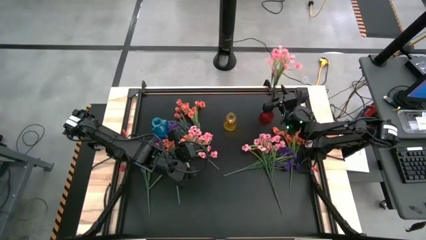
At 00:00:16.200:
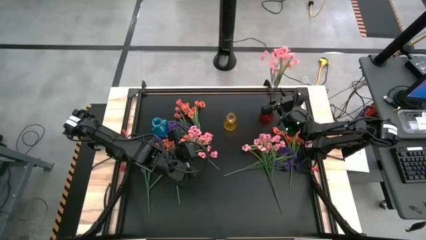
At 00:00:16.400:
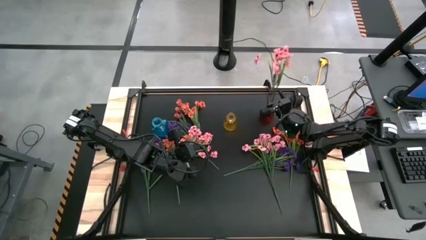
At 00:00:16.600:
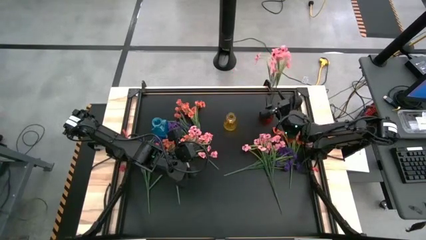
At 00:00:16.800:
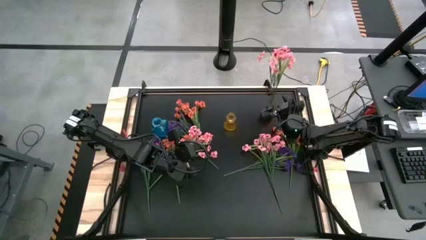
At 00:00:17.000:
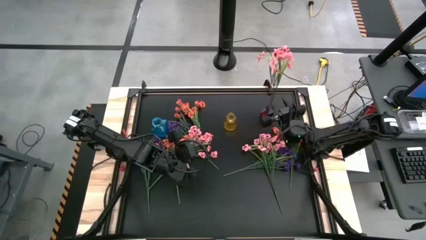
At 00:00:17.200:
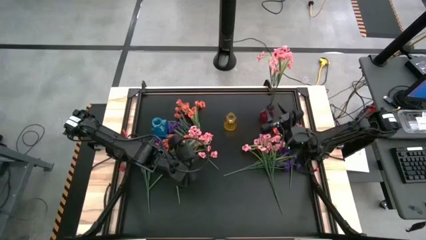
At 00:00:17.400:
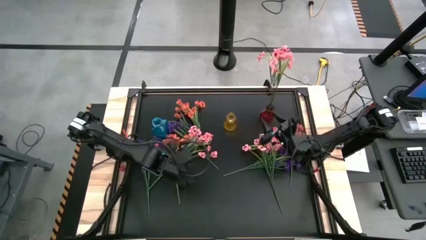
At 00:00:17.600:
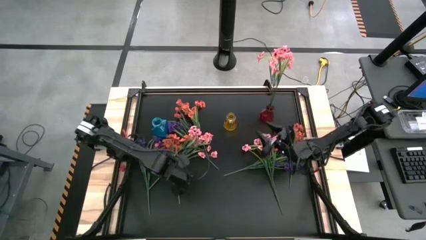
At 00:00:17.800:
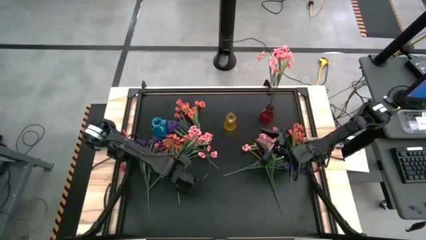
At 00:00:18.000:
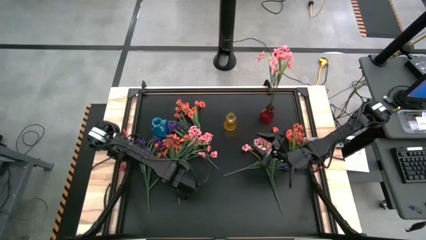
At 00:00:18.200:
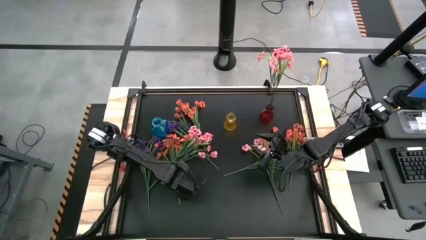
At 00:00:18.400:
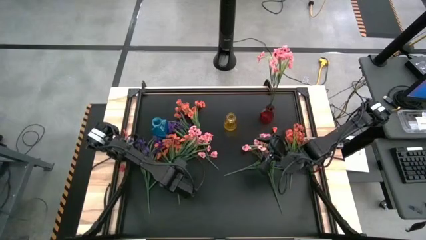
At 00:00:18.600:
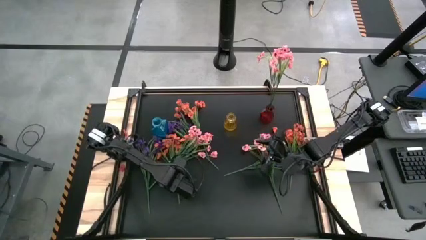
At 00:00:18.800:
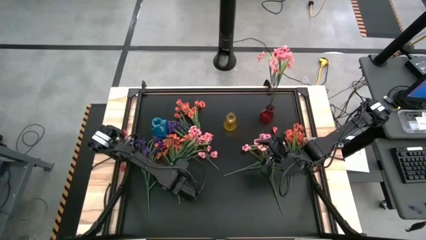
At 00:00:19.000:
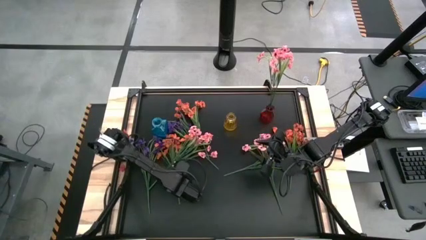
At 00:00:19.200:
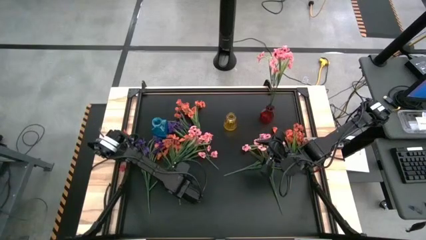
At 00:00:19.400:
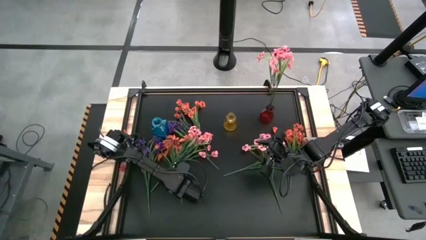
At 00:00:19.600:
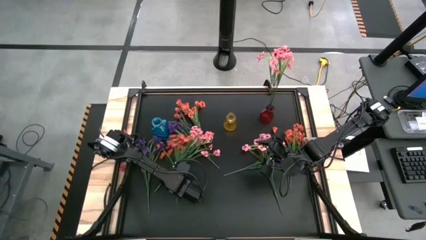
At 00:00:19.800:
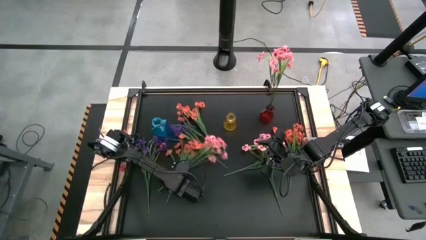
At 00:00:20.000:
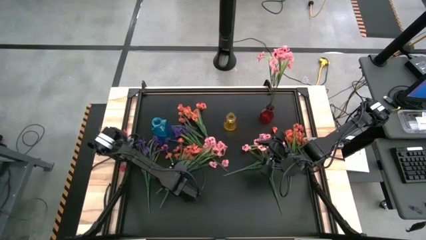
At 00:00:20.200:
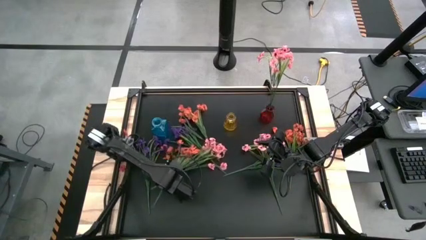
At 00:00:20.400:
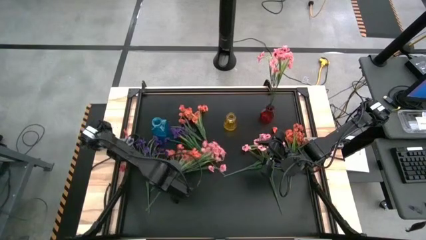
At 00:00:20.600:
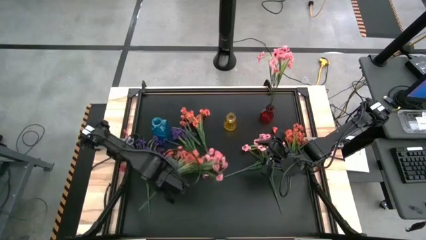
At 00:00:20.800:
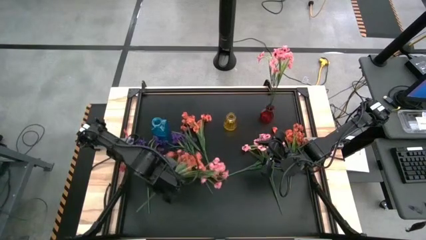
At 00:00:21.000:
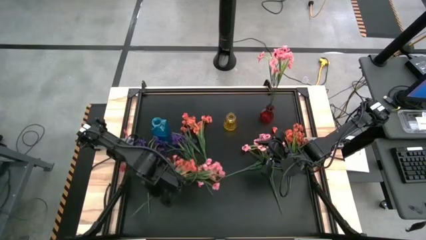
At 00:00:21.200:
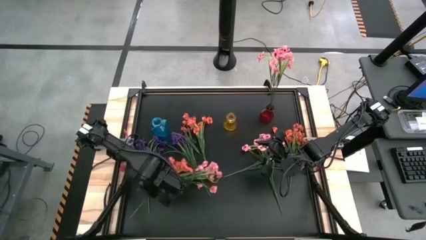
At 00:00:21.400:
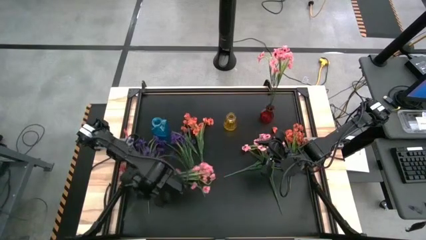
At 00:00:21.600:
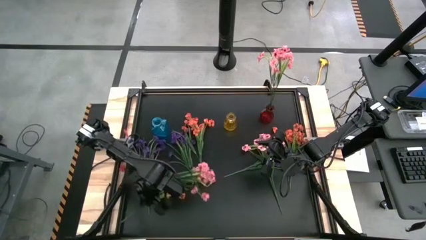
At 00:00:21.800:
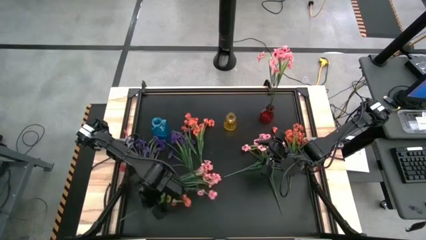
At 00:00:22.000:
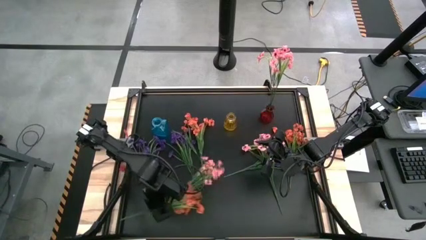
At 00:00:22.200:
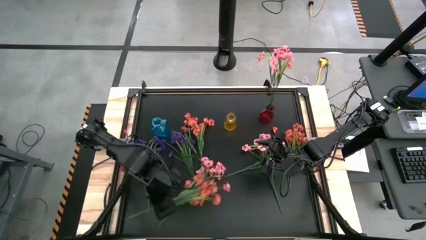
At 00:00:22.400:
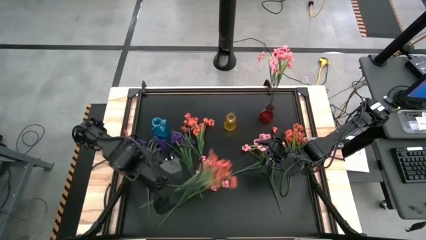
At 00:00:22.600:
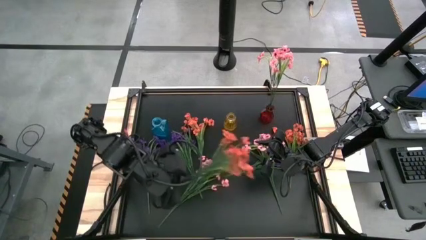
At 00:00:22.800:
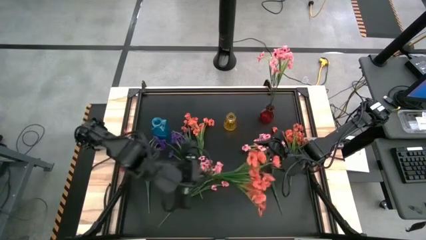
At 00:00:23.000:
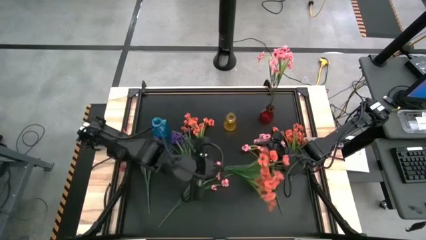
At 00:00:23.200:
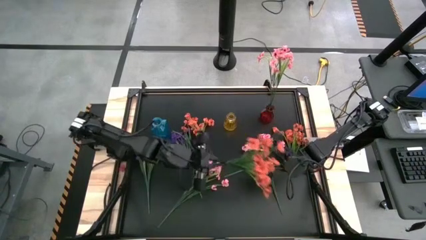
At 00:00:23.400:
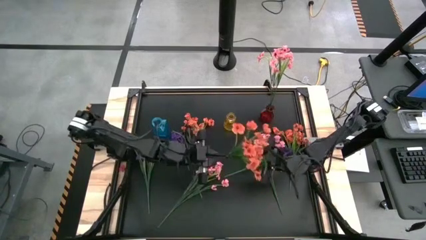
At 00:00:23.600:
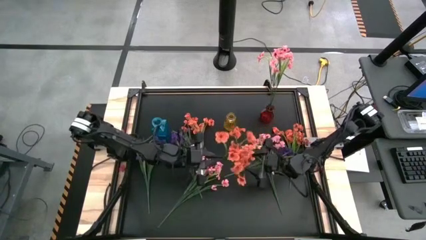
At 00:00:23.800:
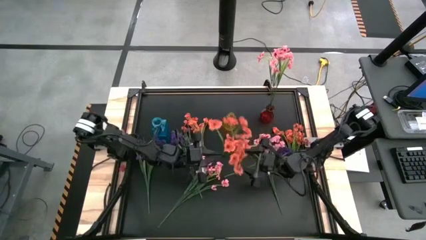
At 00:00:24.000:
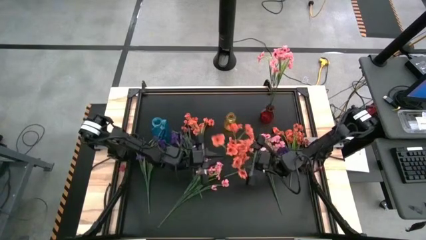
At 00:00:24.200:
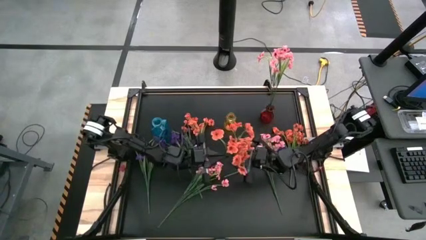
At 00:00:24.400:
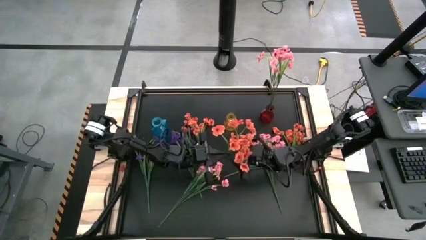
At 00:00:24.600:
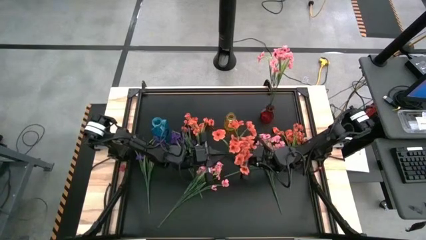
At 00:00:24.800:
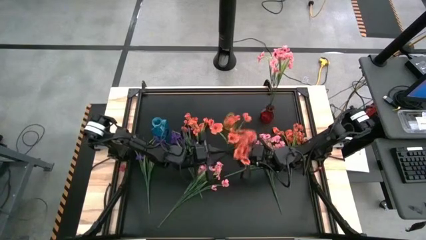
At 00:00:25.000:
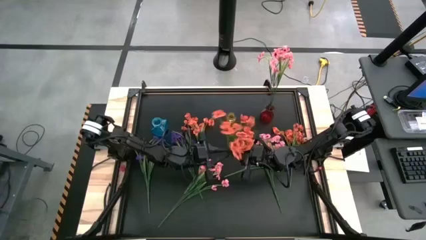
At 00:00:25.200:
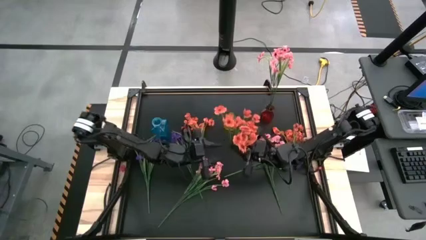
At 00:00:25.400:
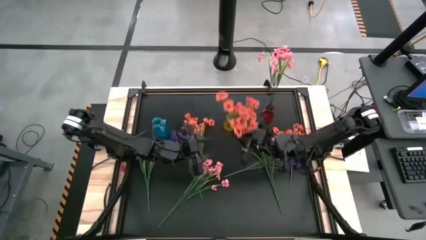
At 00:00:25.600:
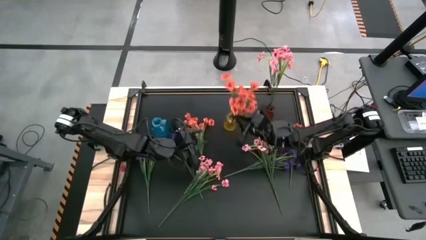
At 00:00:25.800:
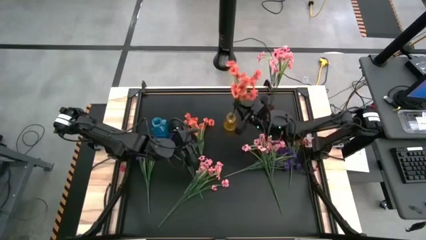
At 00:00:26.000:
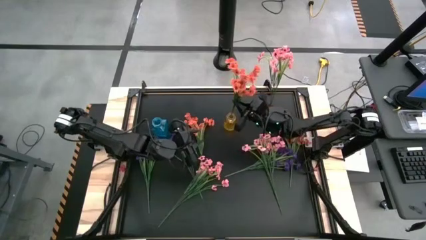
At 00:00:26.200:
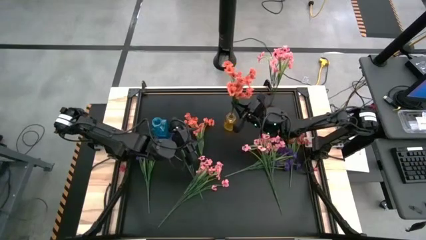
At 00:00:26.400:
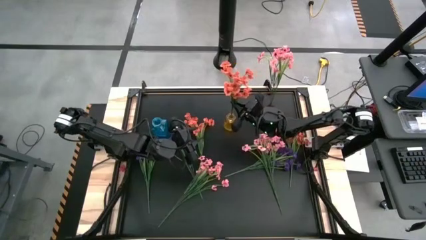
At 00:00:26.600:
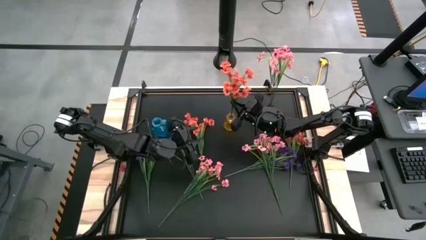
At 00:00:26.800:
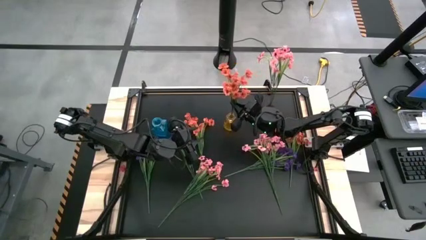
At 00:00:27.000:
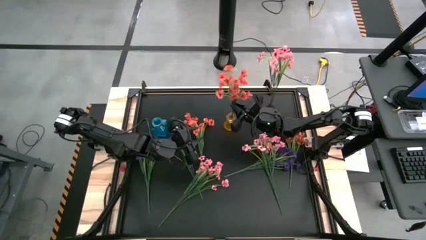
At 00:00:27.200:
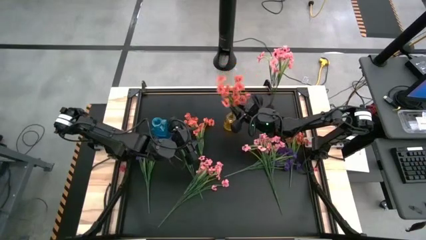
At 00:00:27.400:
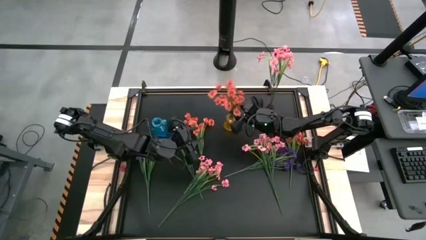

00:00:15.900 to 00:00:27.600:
Task: Sort flowers into vase by color
Put the bottom left orange flowers into the yellow flower vase
